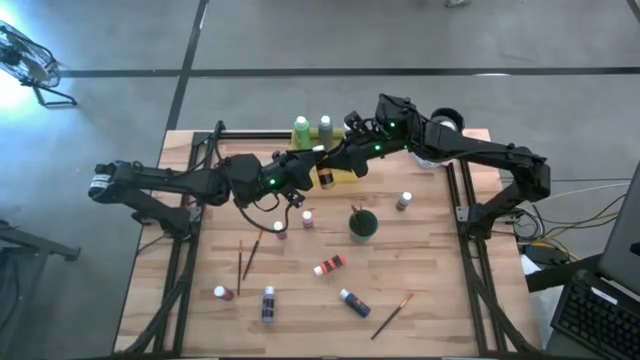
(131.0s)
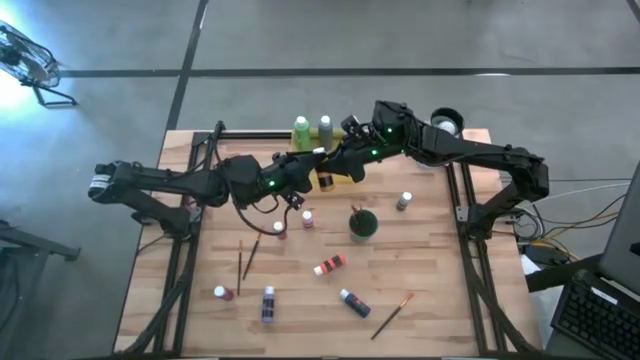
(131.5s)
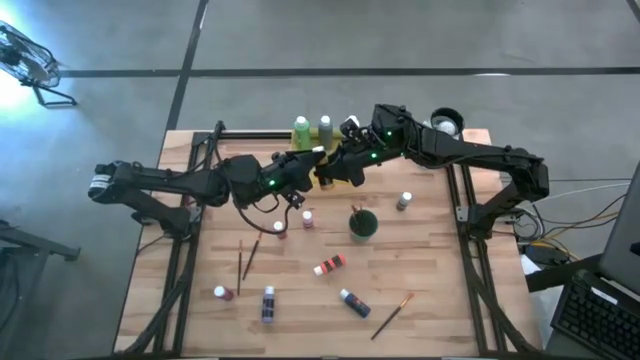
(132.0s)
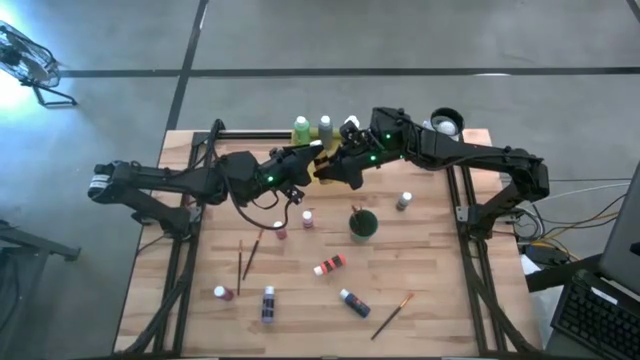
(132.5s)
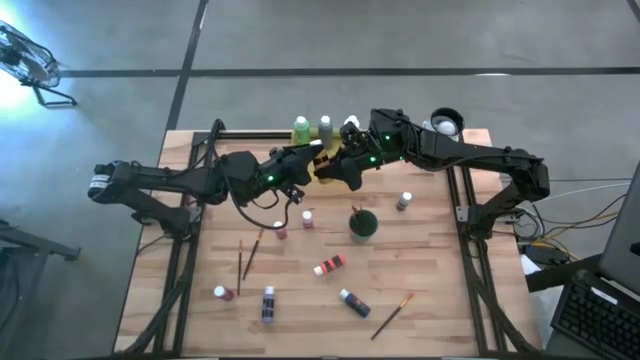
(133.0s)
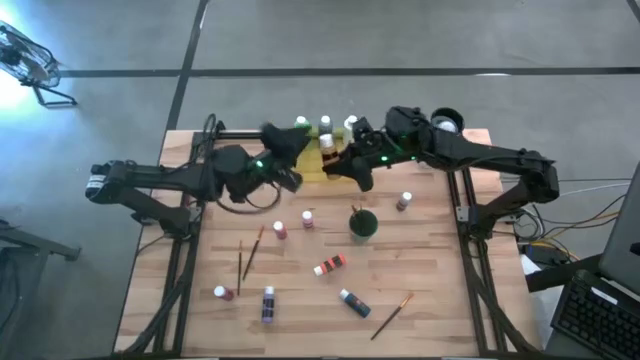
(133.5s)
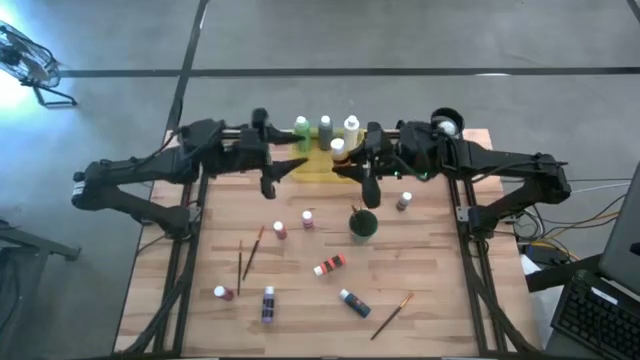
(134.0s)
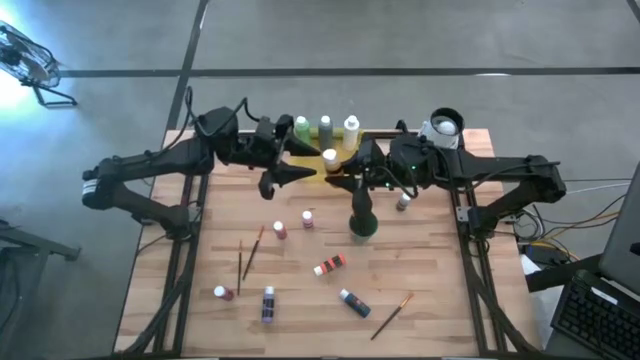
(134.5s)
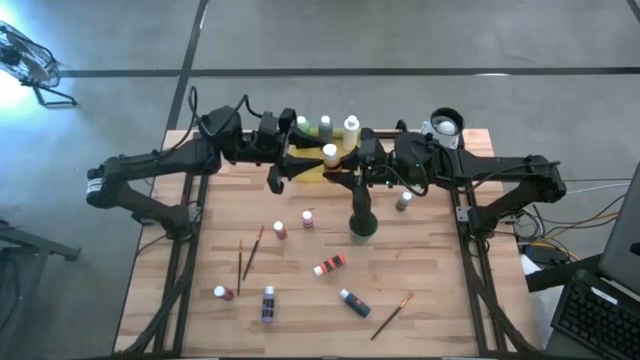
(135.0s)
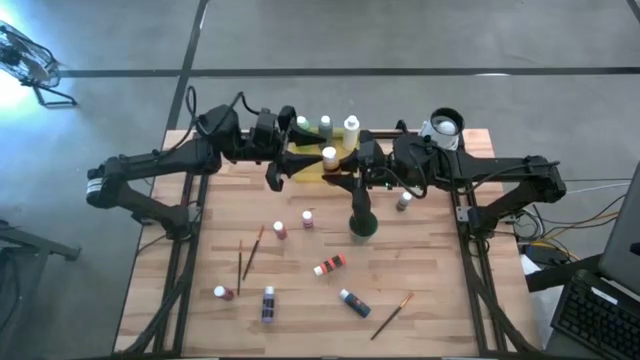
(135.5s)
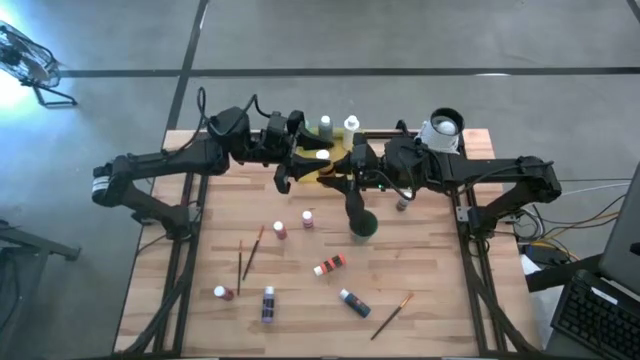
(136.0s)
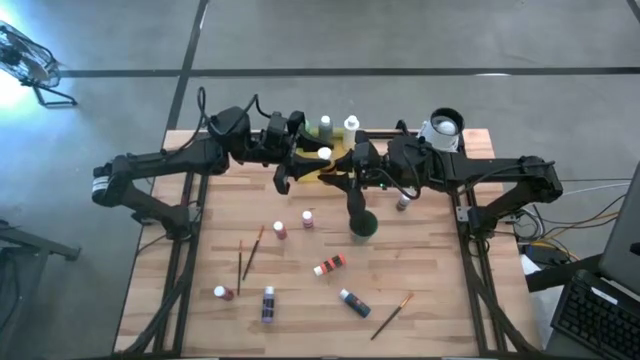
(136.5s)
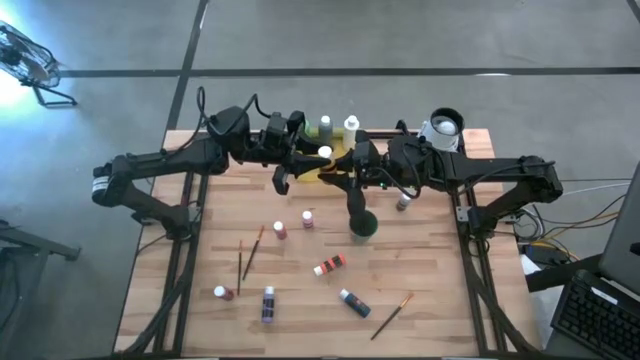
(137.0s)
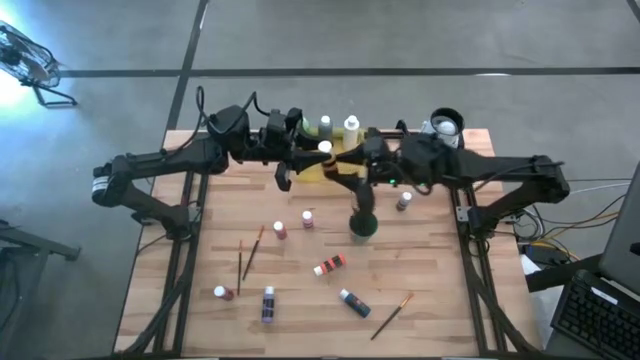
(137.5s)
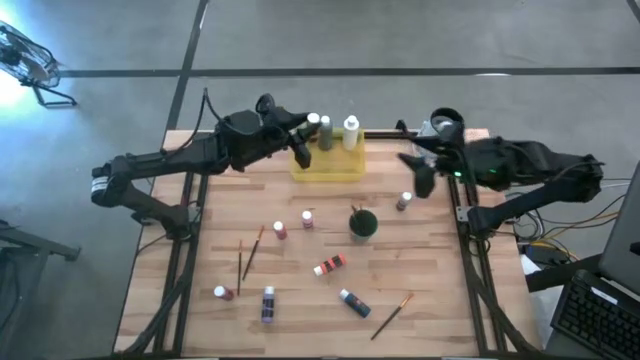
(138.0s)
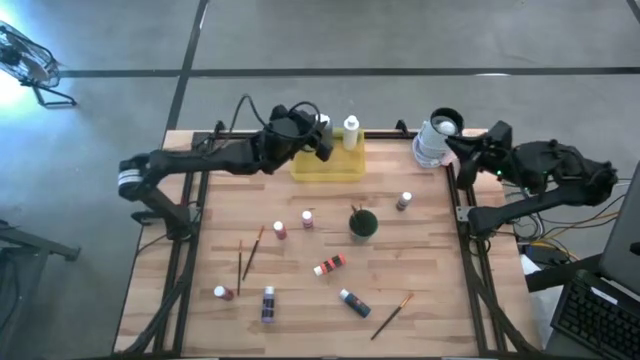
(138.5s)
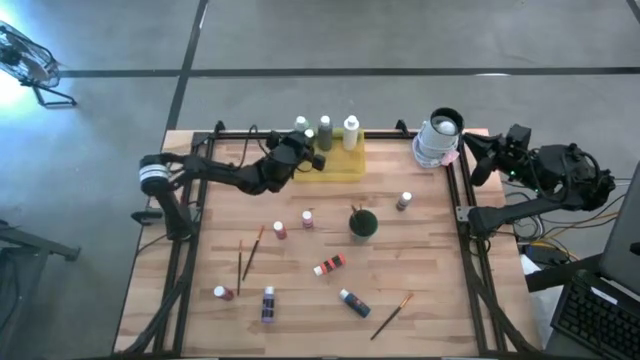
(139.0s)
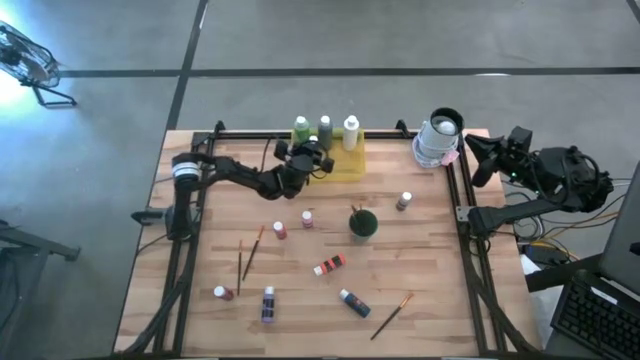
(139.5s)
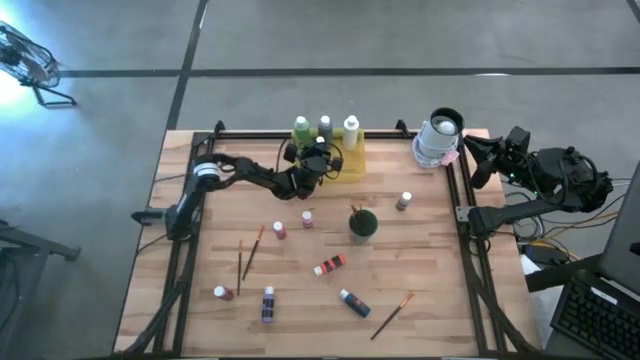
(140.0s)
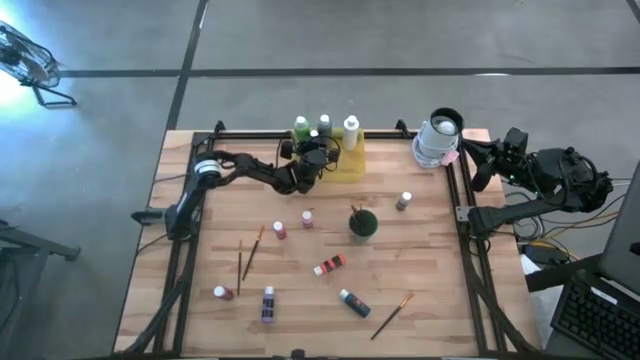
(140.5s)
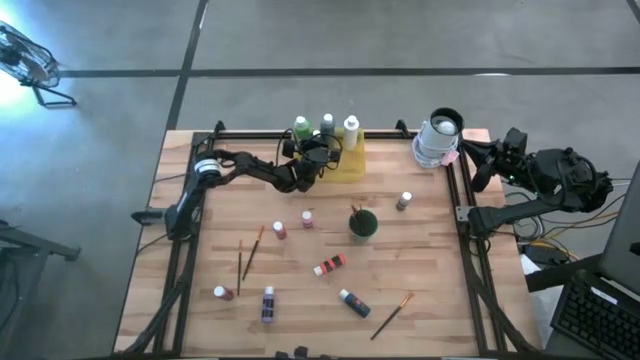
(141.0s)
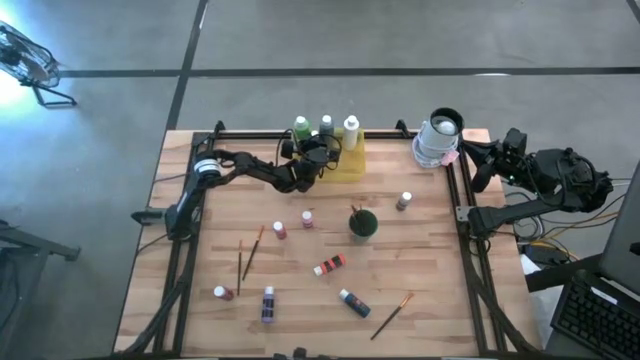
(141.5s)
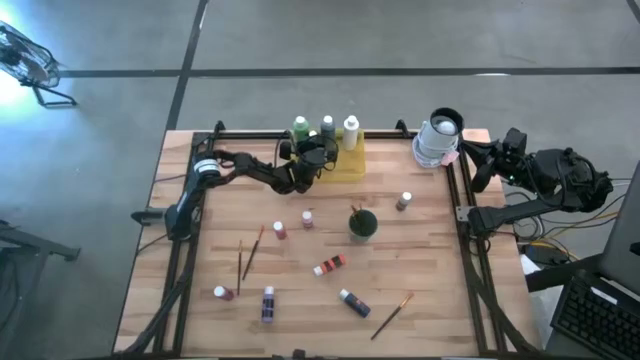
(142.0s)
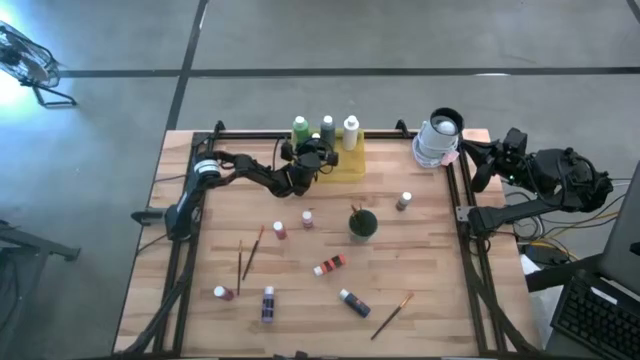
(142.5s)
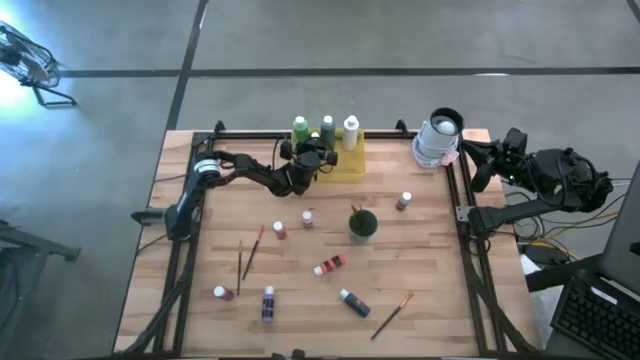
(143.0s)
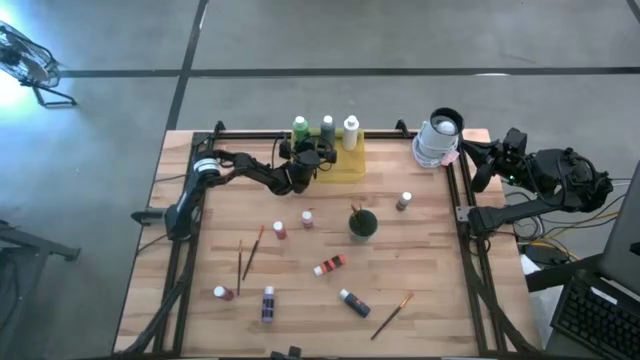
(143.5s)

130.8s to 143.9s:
Task: Pick & Place Paint Supplies
Put the yellow paint bottle into the yellow bin

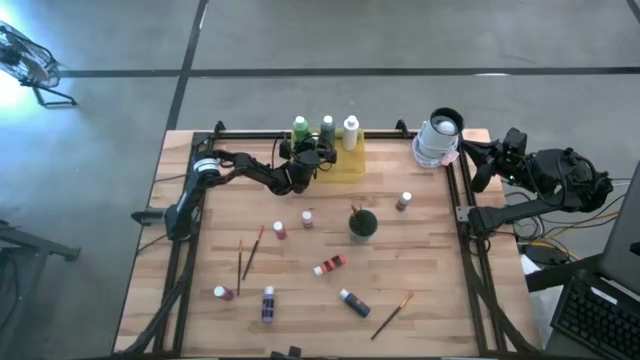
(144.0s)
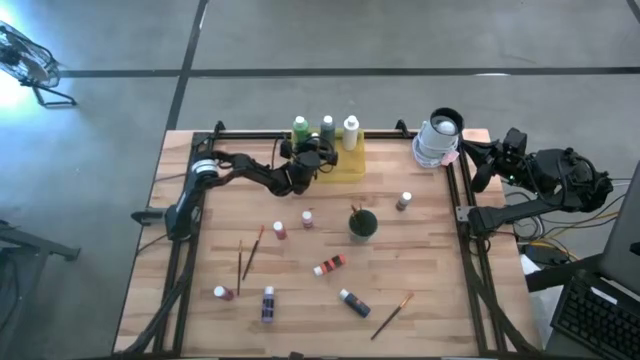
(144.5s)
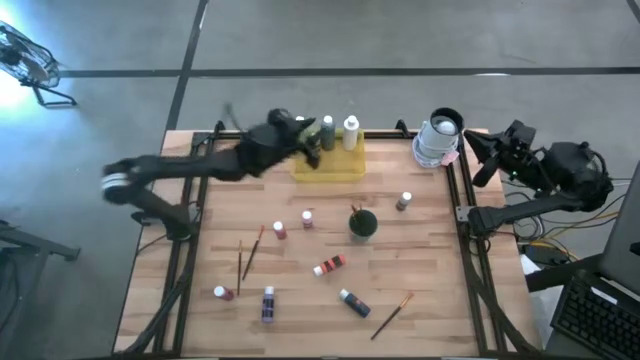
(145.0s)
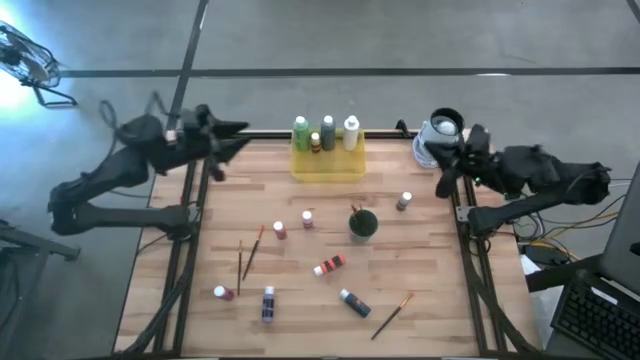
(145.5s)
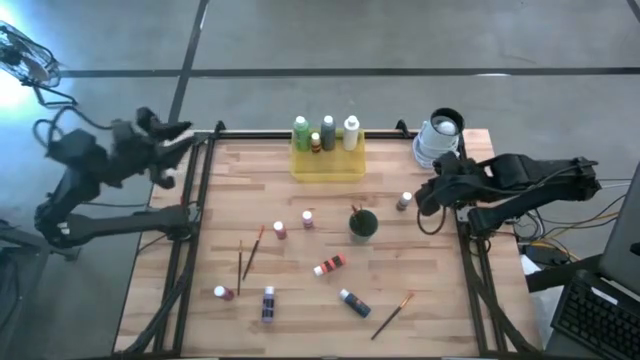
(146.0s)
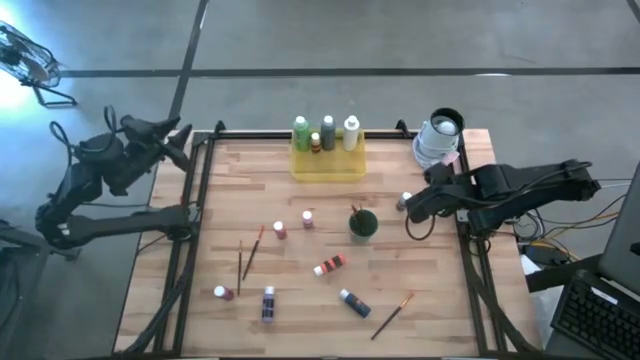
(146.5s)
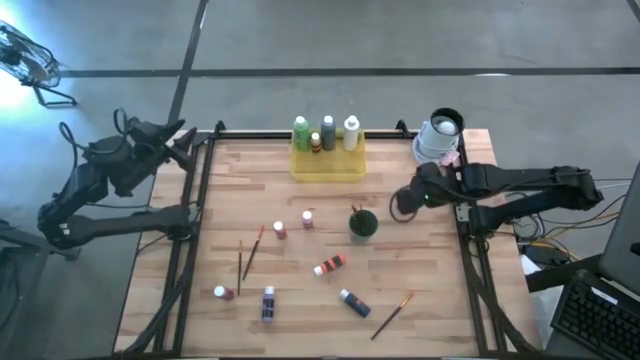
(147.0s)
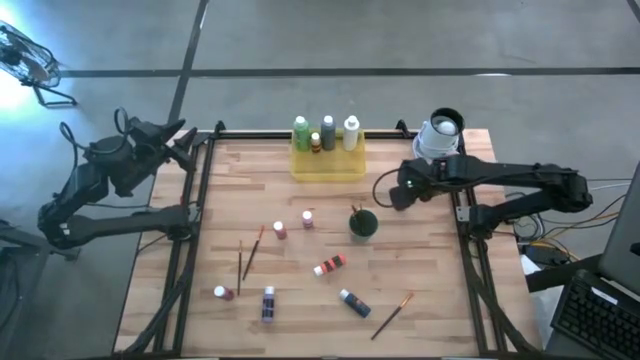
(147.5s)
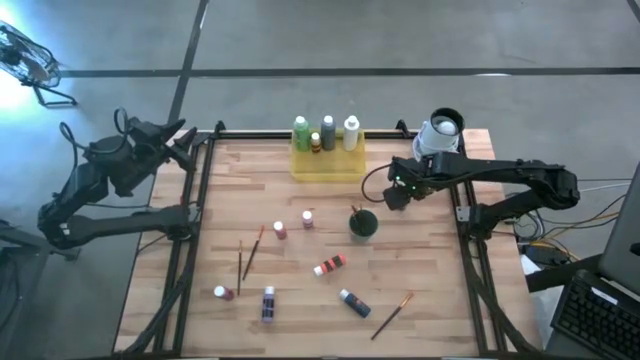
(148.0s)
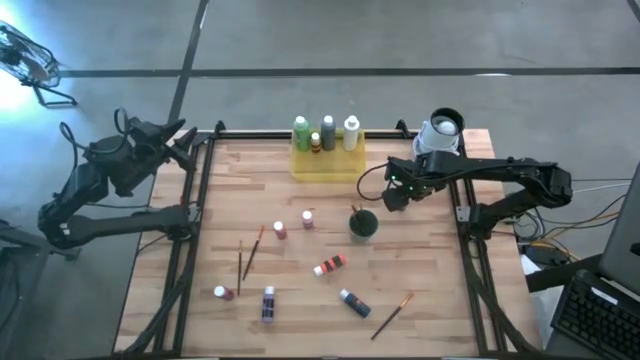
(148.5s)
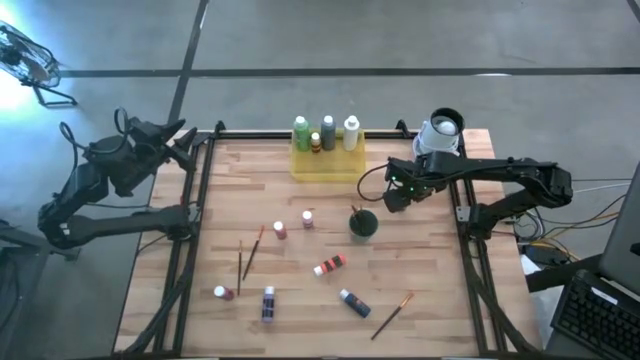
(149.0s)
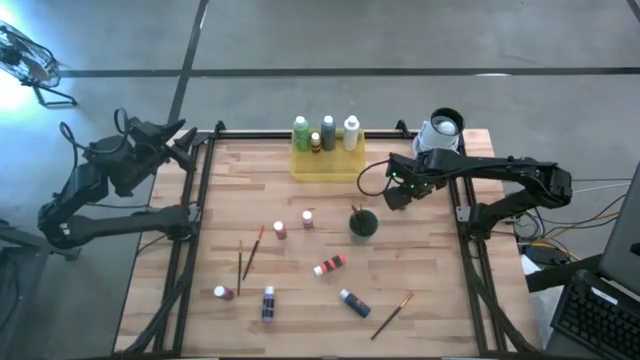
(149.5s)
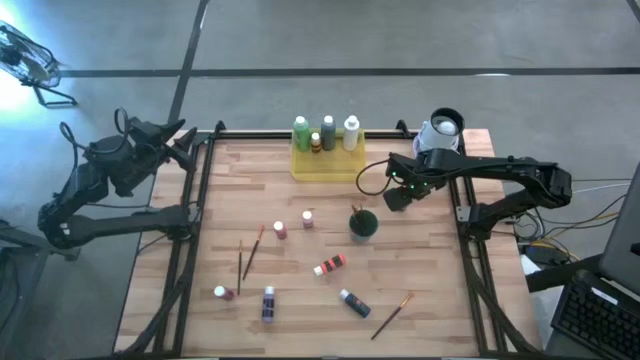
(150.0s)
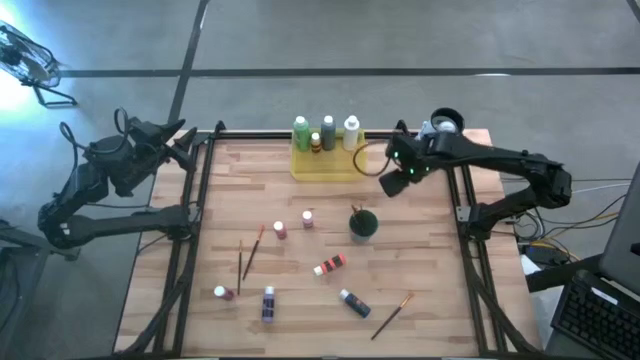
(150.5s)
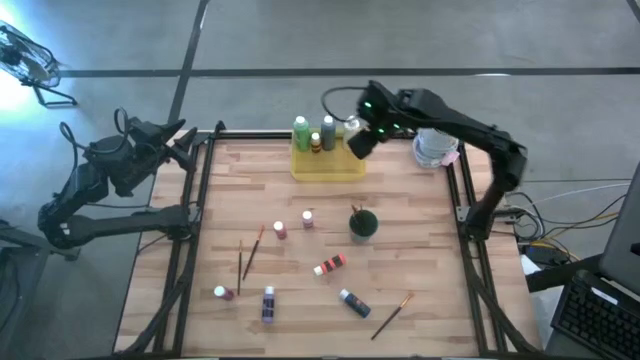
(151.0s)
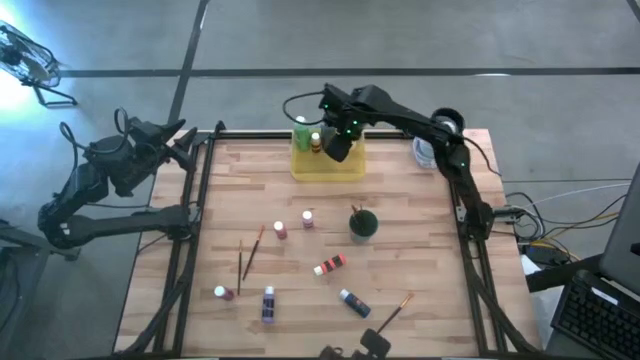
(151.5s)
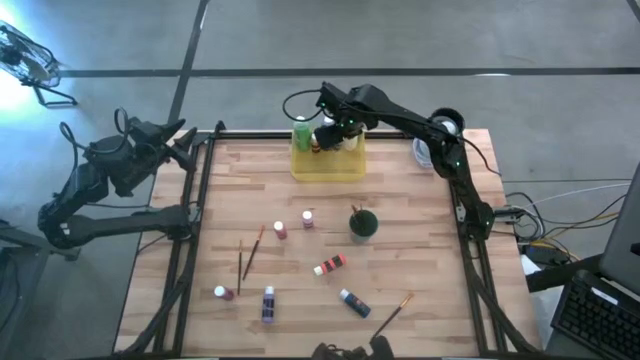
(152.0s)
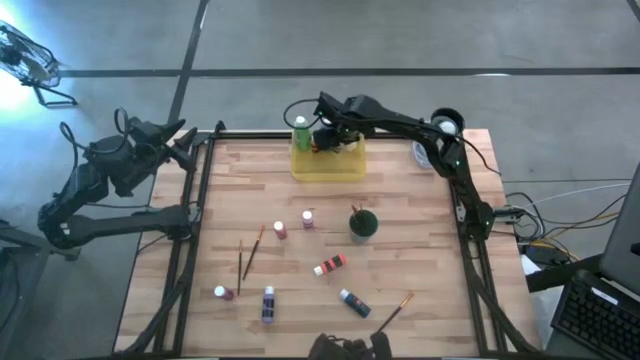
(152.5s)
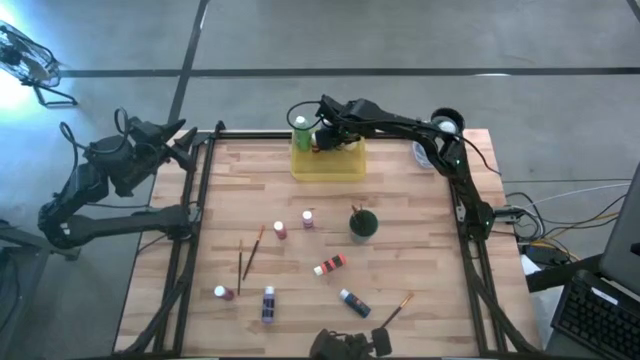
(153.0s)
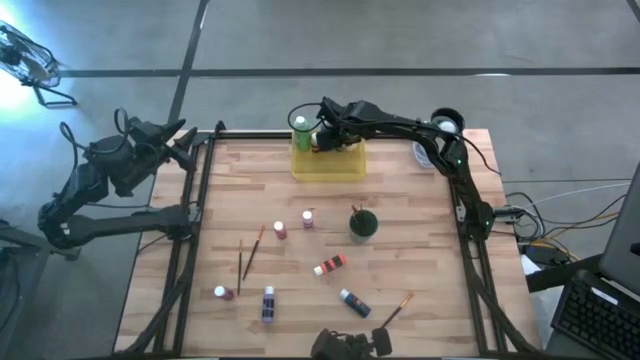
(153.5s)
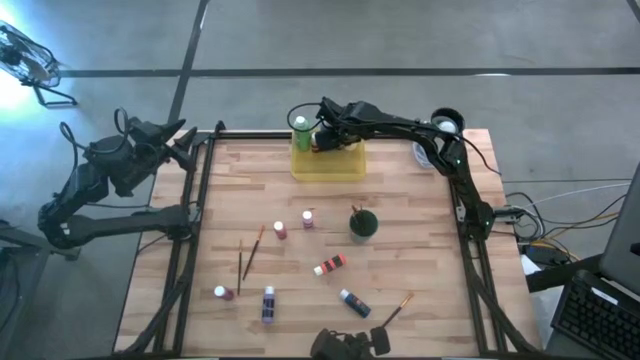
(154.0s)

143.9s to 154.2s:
Put the gray paint bottle into the yellow bin
